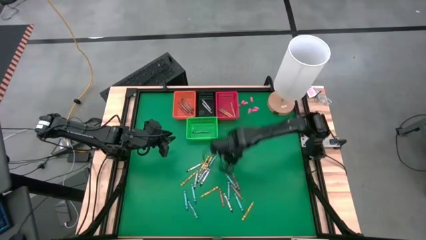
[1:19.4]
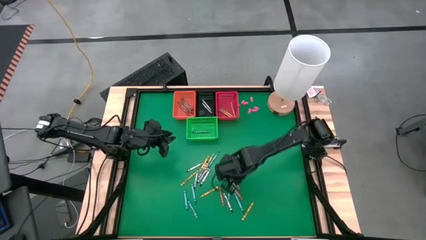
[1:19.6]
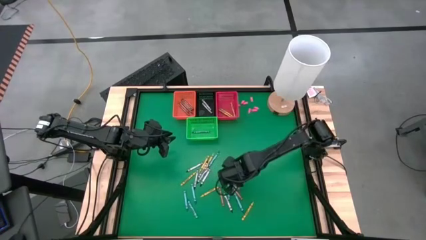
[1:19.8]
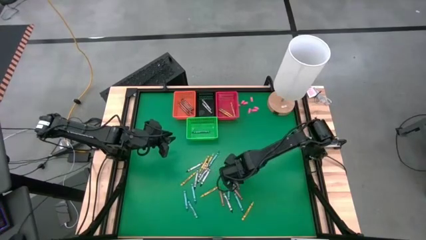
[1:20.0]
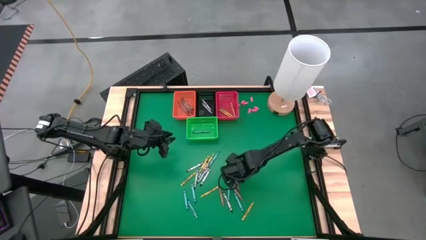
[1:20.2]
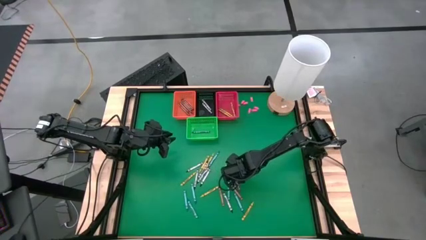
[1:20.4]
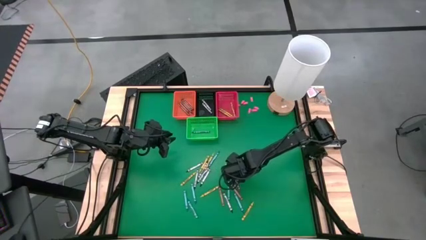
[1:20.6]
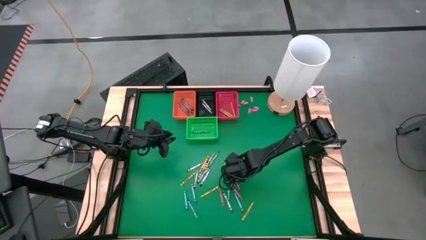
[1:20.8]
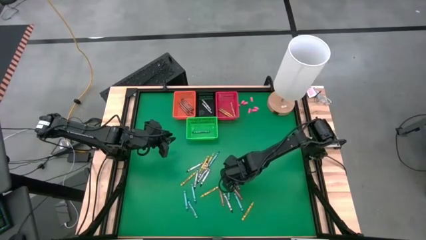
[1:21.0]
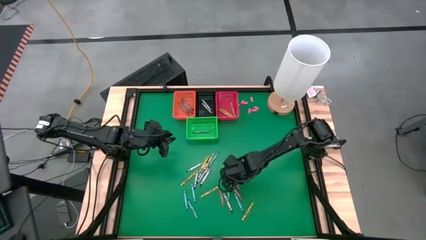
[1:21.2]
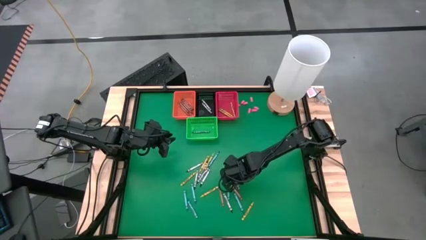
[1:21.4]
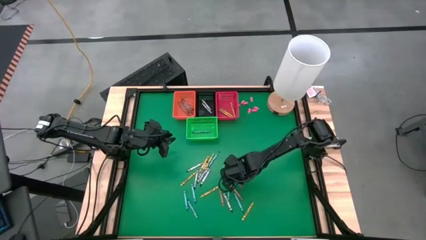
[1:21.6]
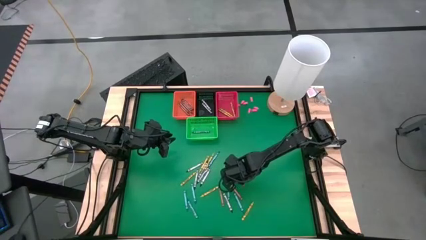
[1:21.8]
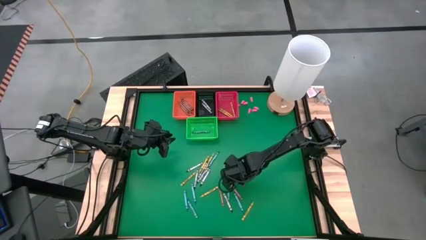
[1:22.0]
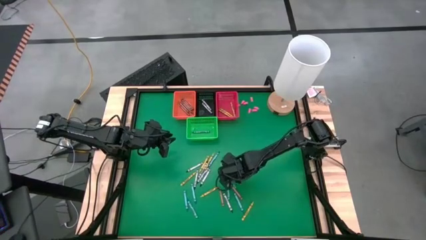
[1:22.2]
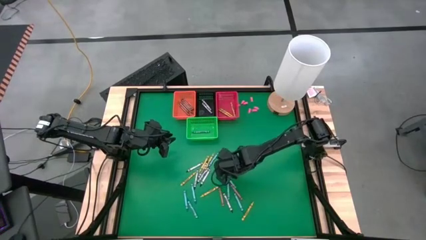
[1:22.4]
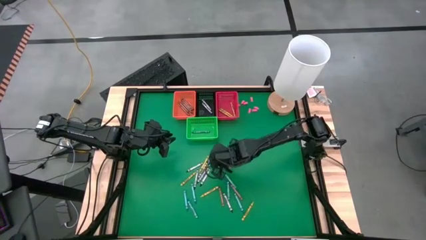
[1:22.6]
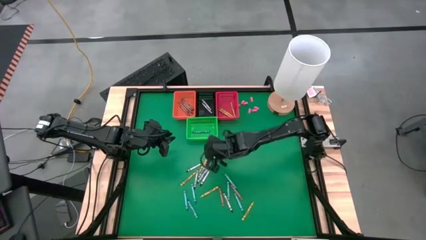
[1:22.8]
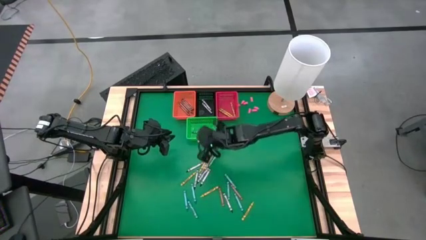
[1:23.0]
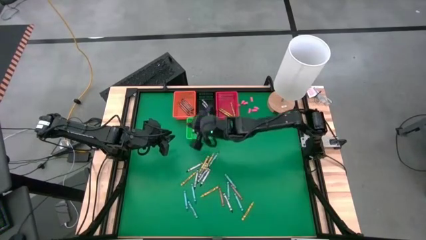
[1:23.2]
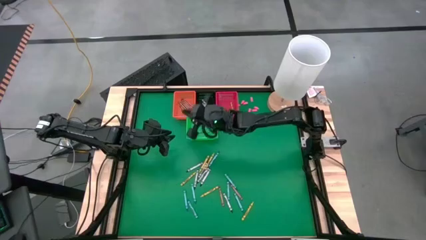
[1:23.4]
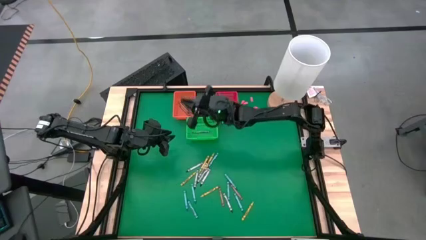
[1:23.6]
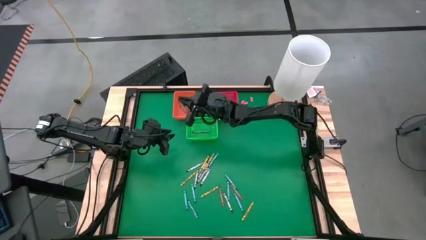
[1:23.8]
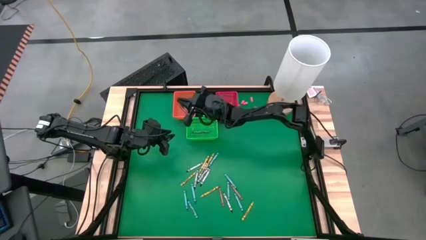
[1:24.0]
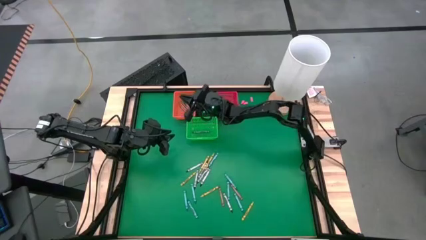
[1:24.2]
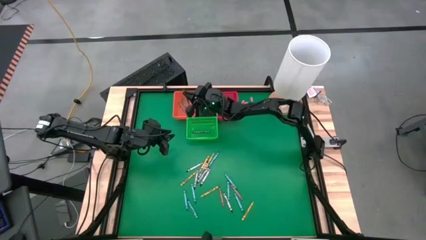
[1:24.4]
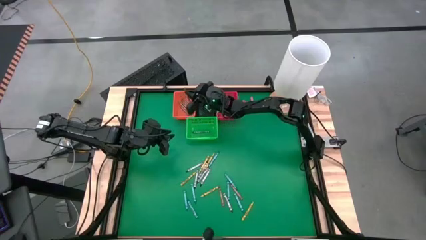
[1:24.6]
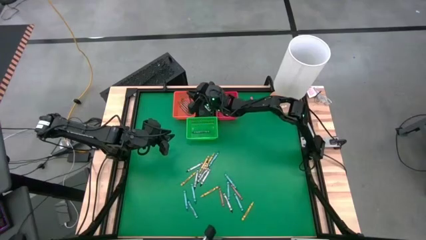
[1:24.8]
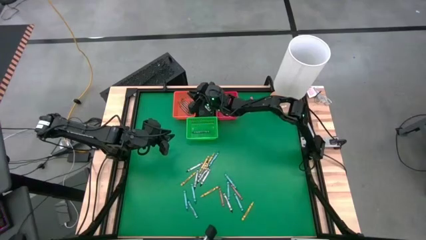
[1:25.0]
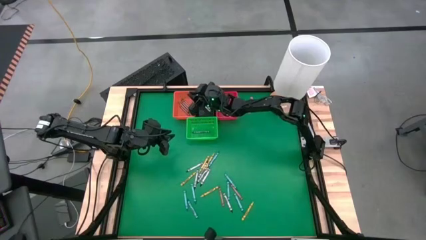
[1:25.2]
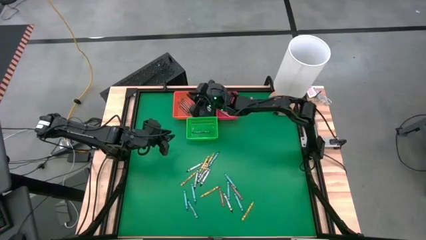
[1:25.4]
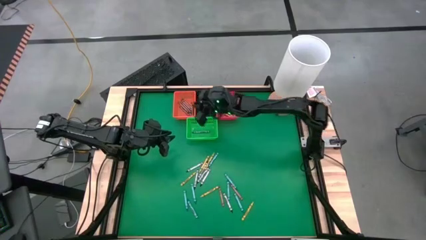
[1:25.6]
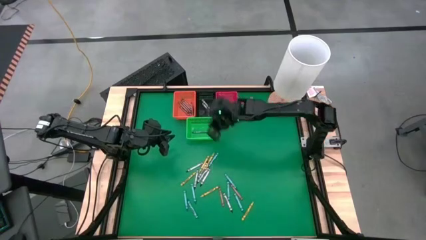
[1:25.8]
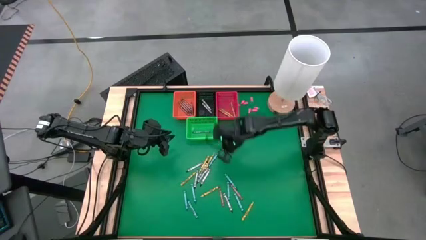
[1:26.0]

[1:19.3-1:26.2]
Task: Sort crayons
Put a red crayon in the orange basket

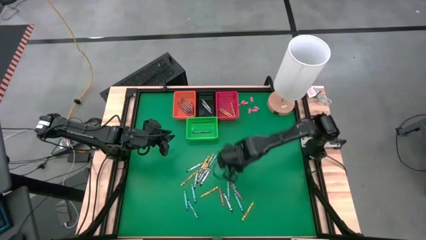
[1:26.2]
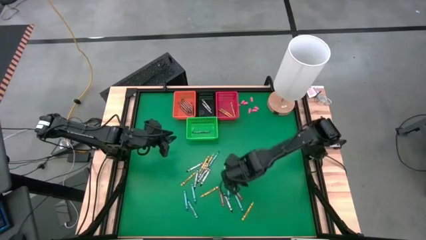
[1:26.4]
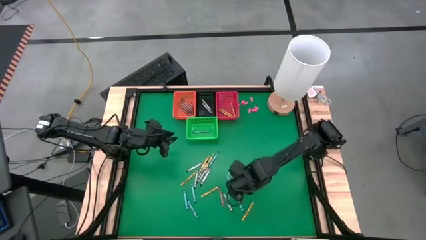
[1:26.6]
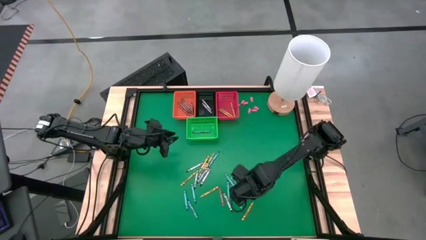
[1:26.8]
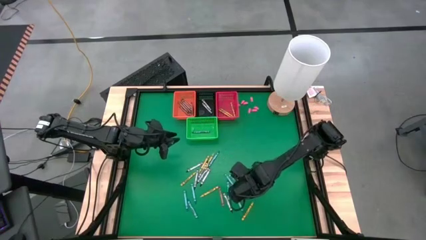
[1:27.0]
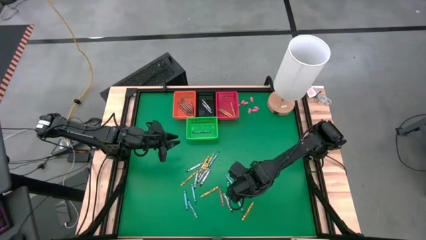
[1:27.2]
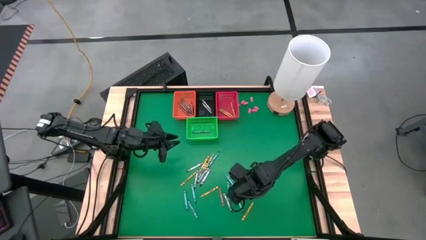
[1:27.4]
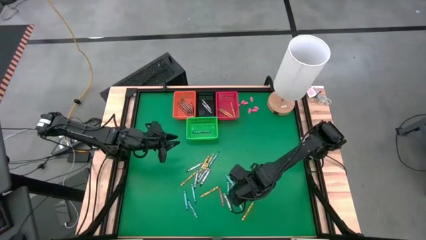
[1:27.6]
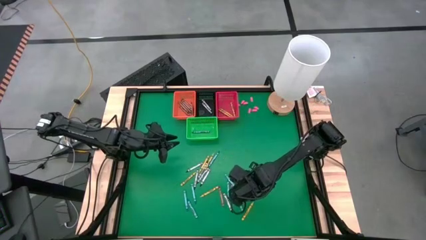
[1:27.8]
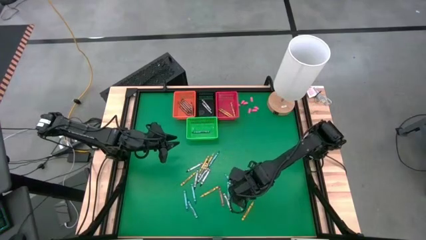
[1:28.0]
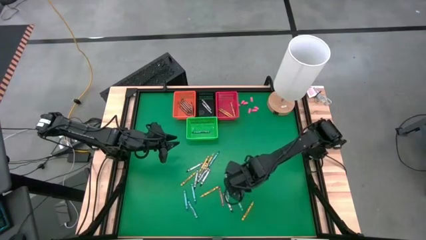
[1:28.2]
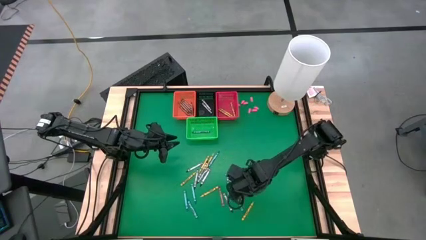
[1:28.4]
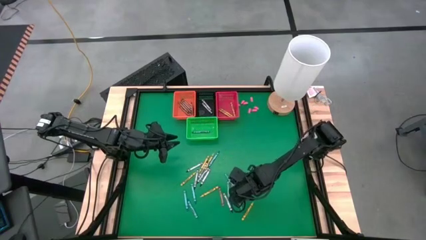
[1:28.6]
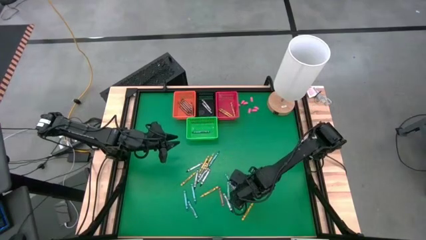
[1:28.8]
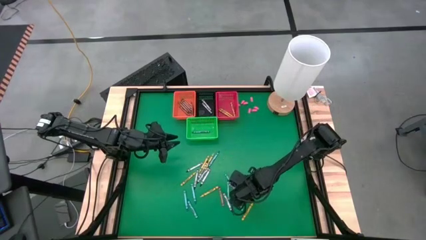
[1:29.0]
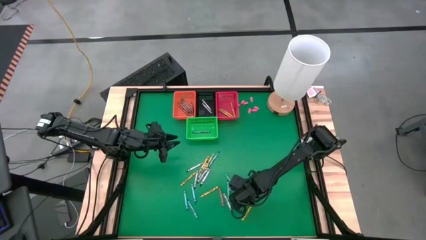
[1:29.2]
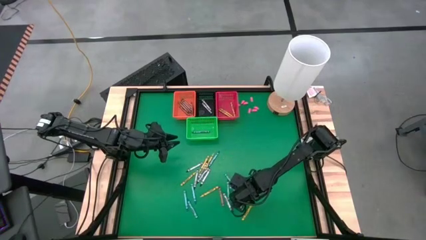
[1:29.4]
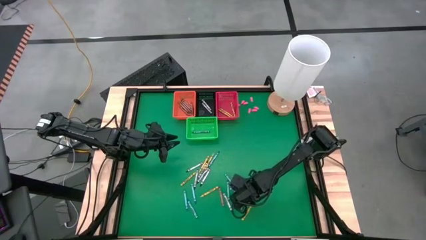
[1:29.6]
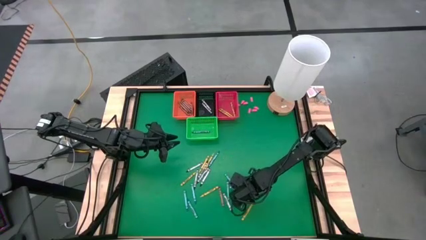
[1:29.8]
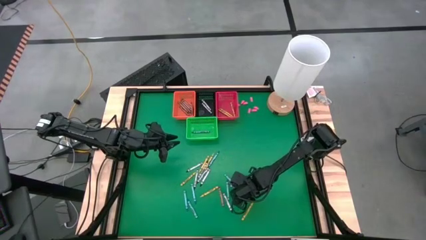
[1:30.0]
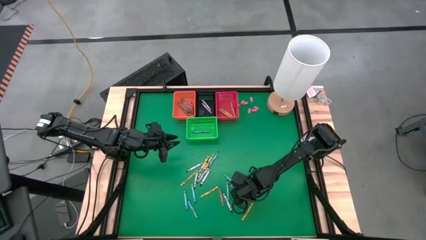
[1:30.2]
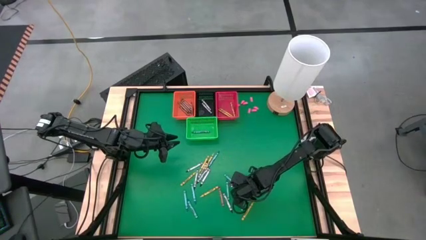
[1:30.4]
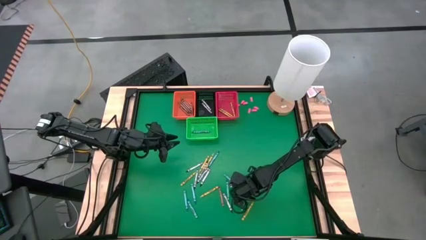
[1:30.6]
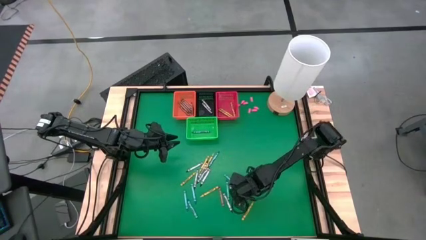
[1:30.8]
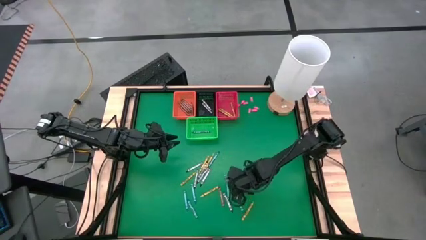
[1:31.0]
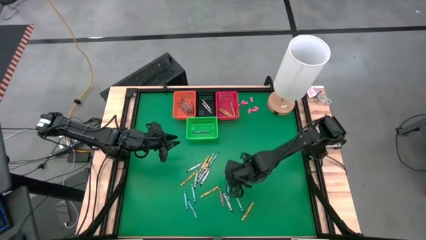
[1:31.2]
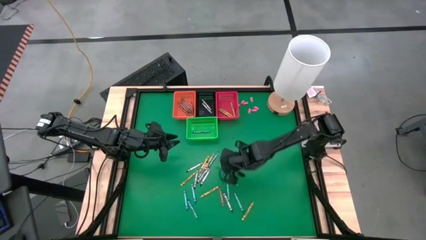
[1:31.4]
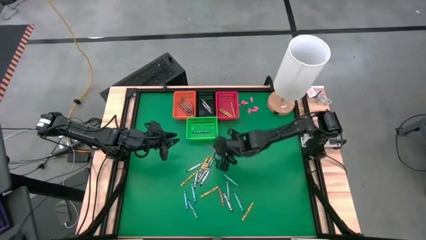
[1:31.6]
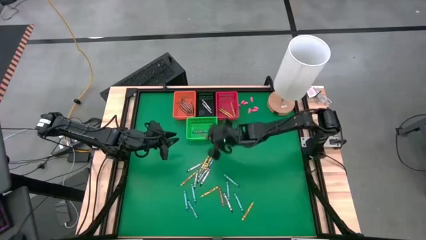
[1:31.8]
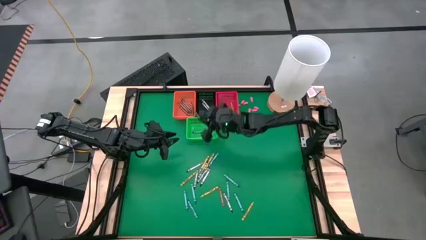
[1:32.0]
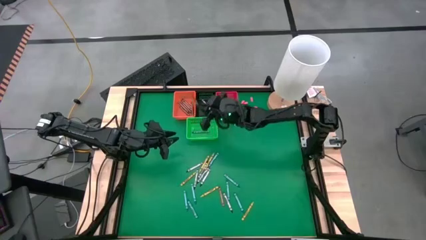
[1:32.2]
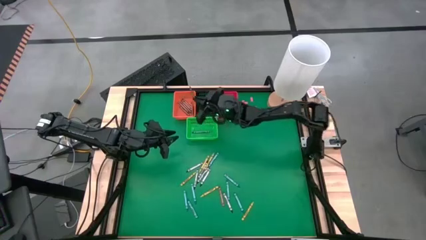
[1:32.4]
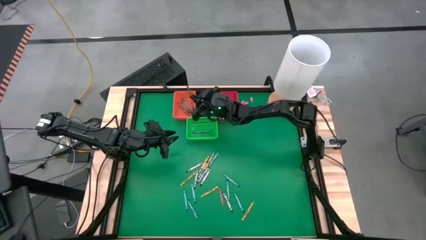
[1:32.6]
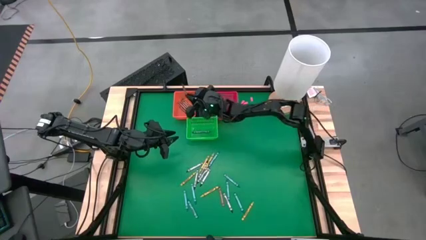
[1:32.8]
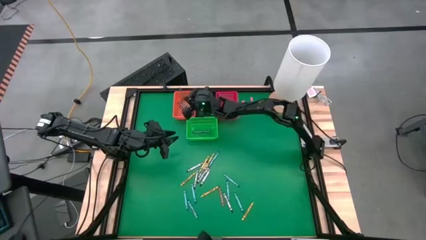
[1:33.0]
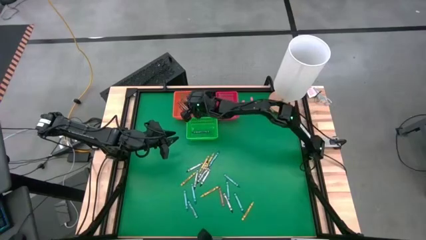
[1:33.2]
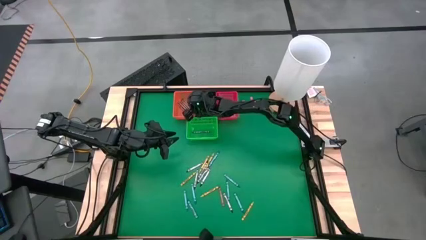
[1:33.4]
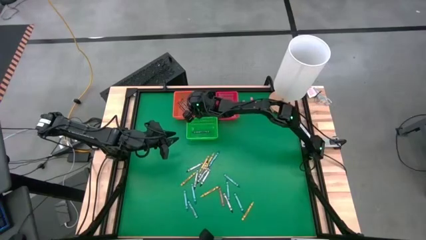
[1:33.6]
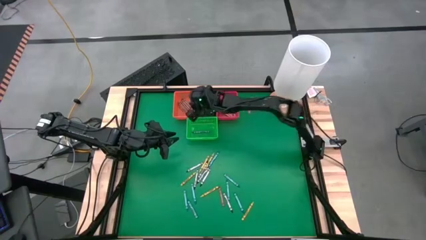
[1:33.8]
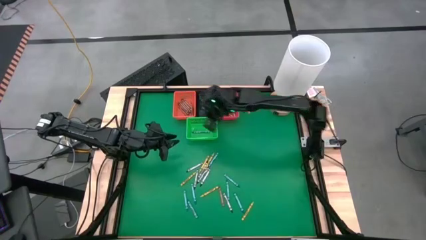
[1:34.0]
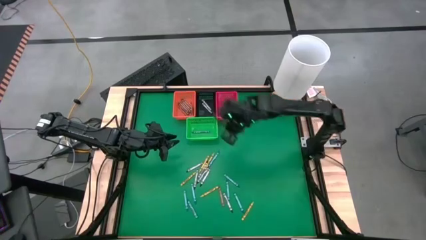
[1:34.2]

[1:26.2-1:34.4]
Put a red crayon in the orange basket
